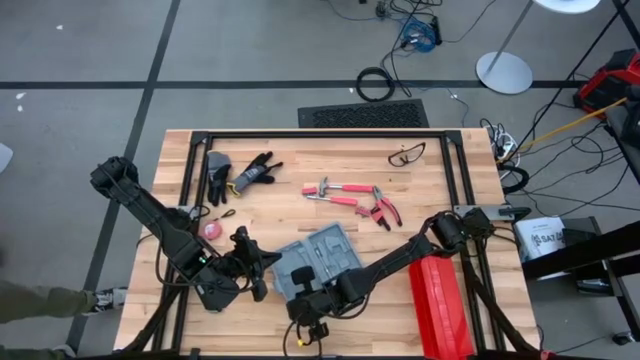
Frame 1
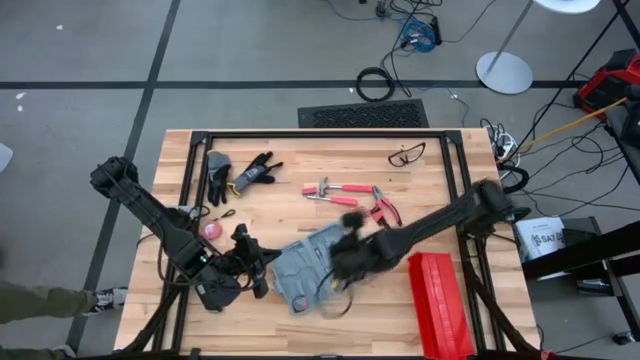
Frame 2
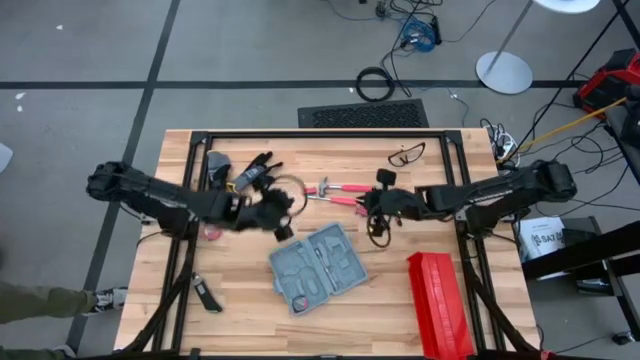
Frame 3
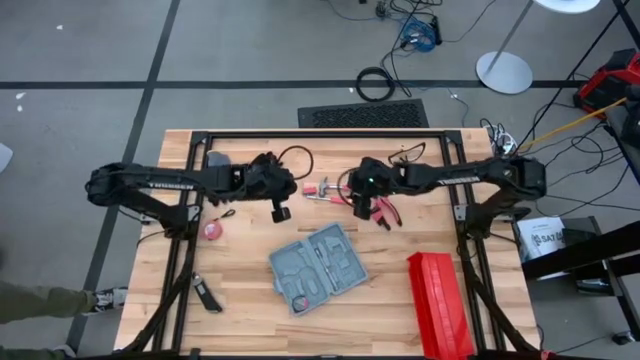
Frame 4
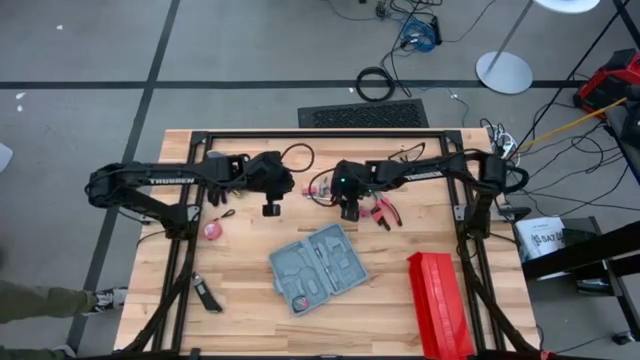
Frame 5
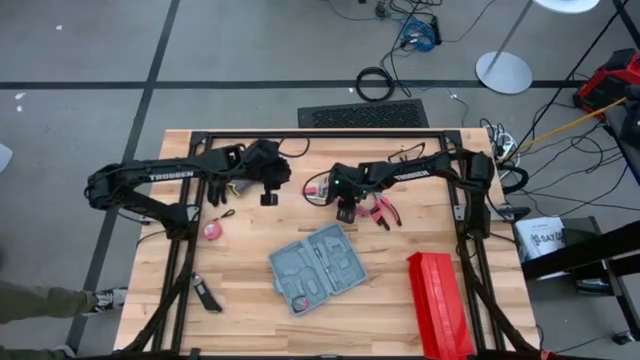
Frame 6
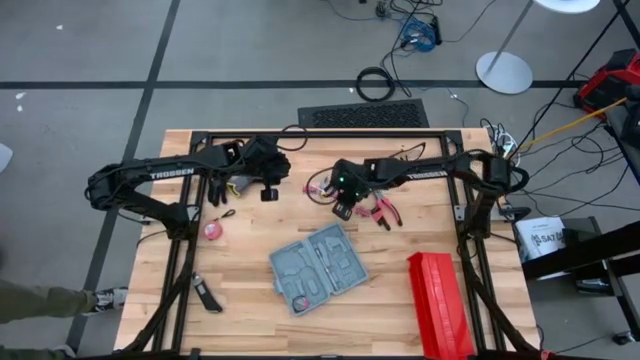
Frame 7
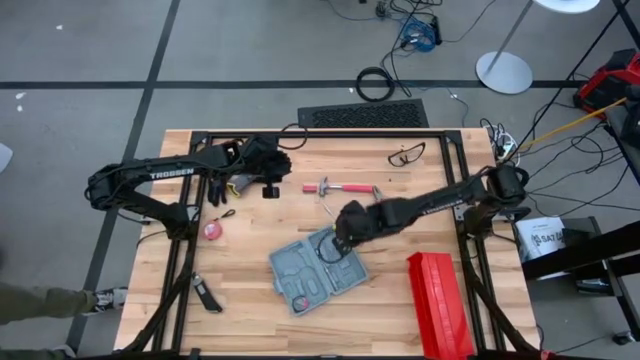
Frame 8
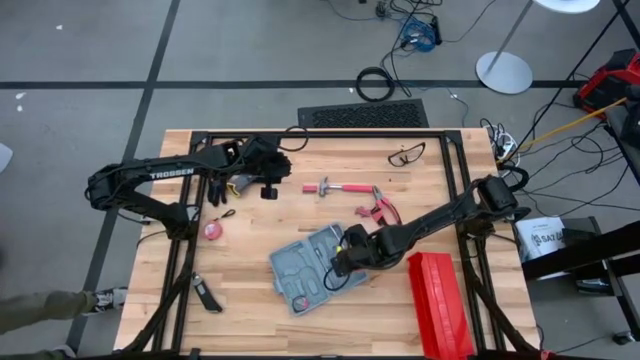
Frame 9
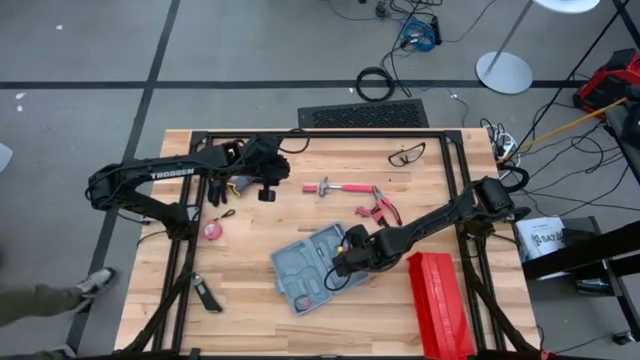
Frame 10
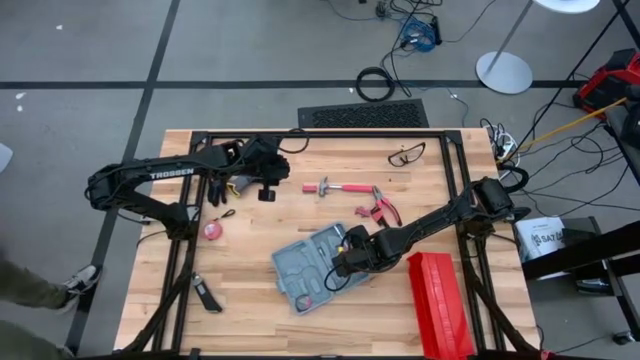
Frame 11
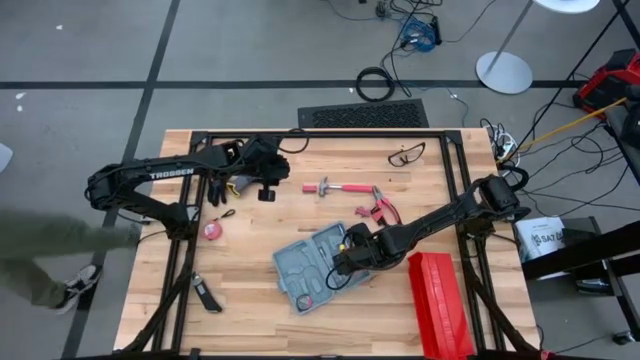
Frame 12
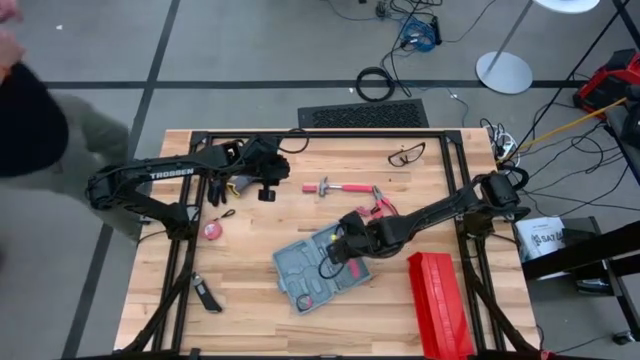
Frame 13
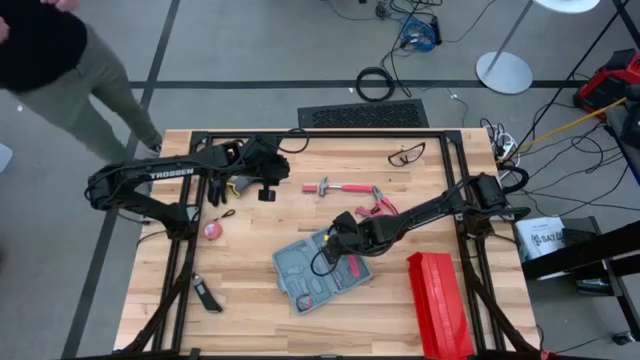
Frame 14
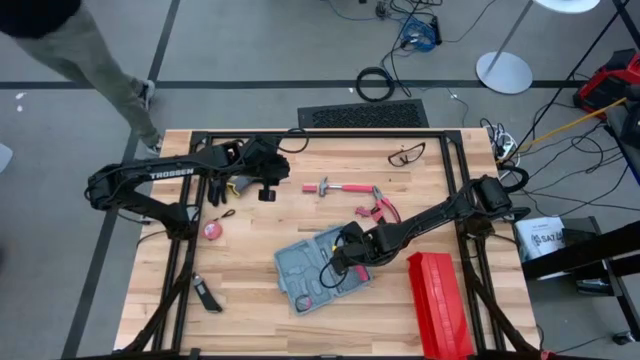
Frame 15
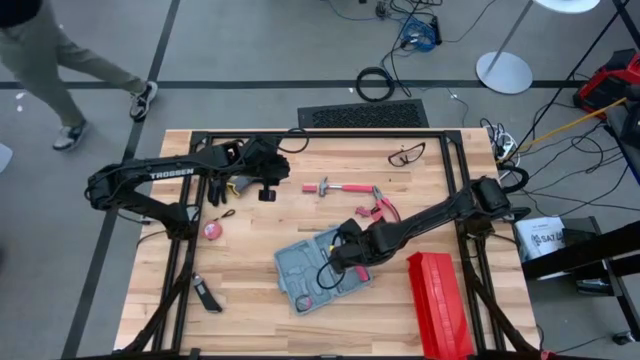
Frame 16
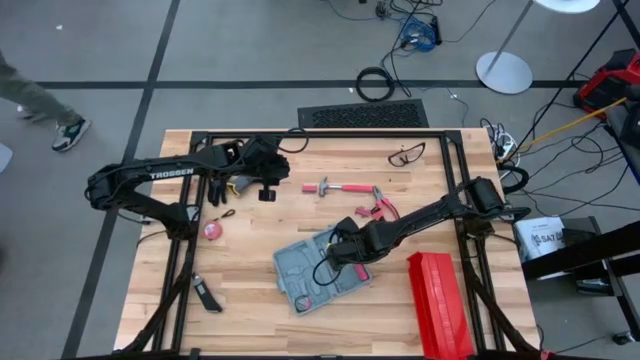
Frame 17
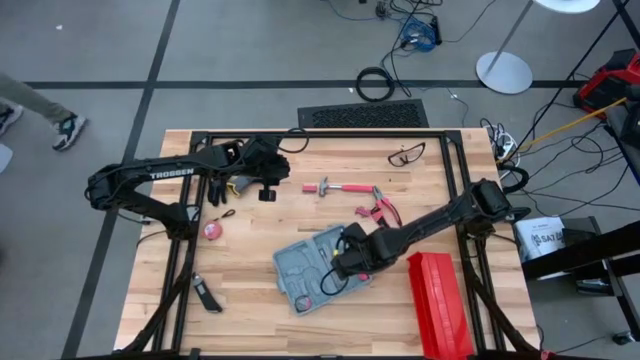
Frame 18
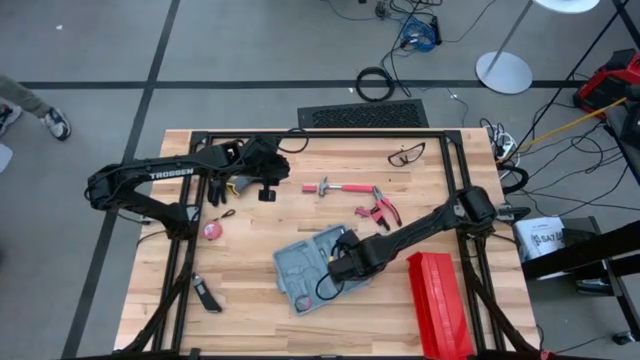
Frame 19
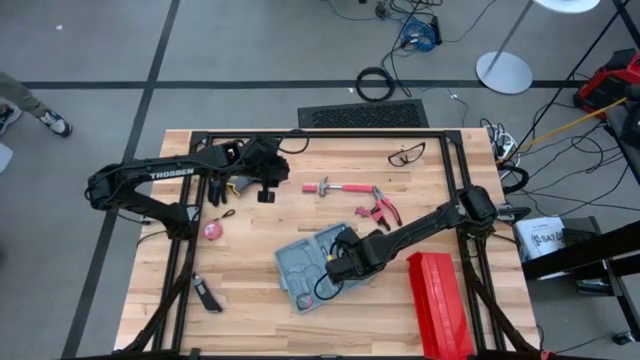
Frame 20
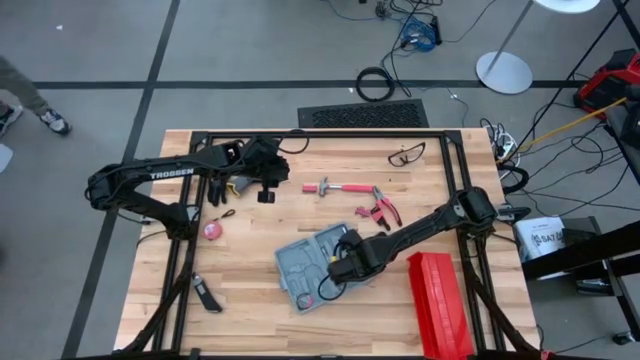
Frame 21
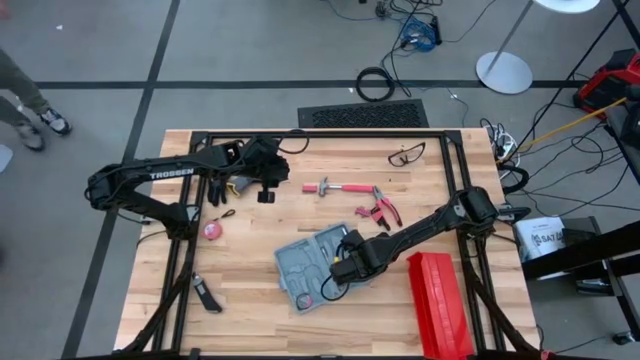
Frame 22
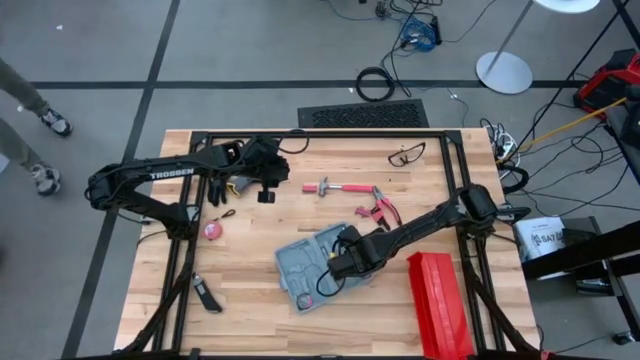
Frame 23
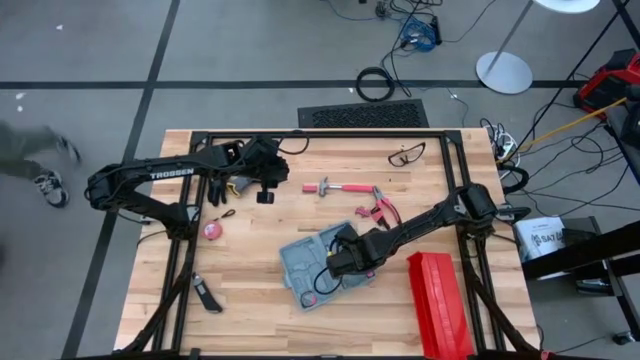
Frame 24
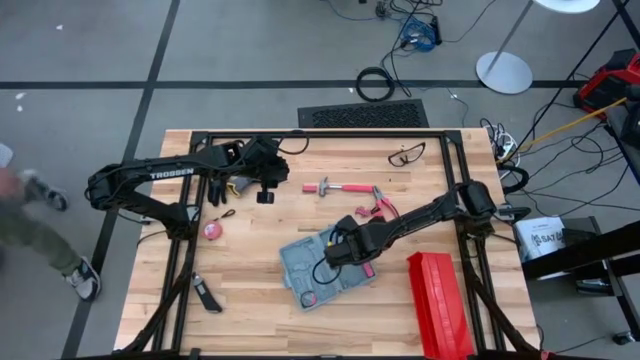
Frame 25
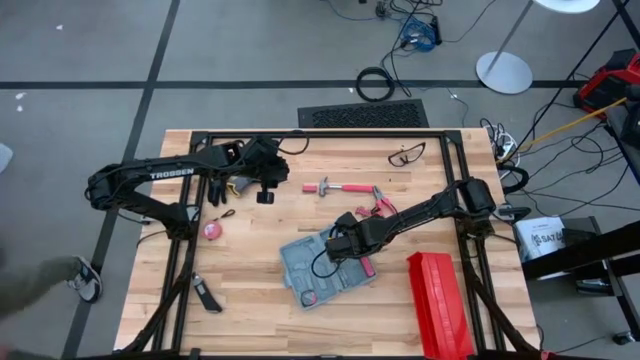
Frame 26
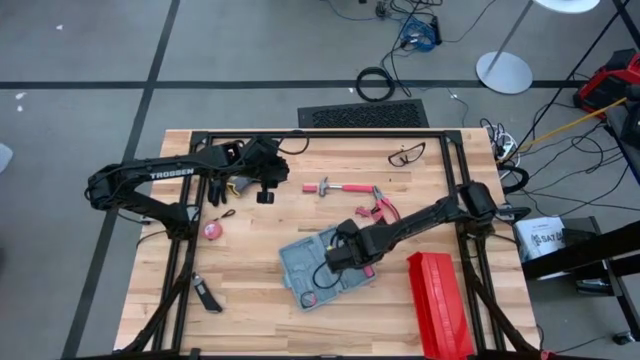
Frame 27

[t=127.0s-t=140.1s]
Task: prefit tool cases
Put the red screwdriver into the gray prefit tools case

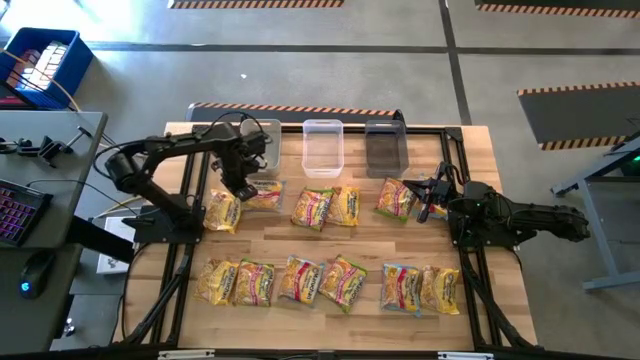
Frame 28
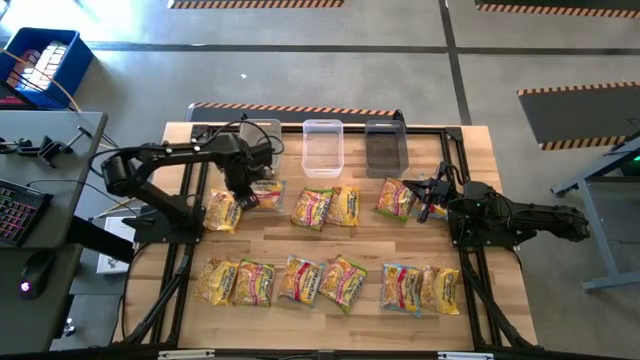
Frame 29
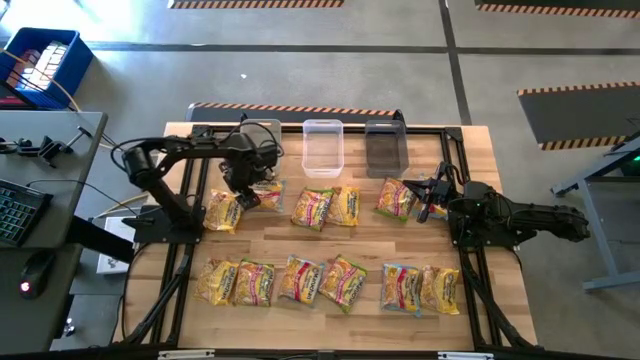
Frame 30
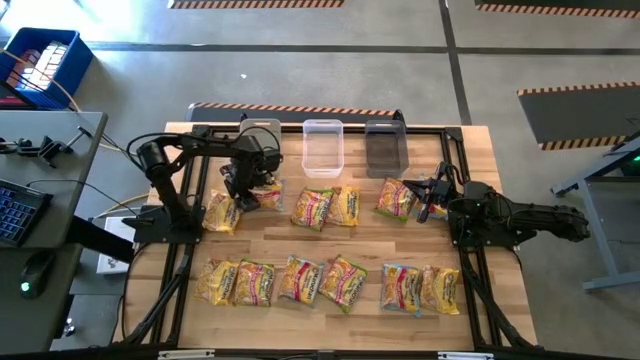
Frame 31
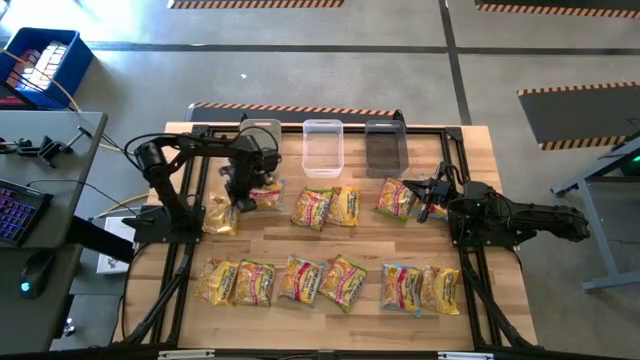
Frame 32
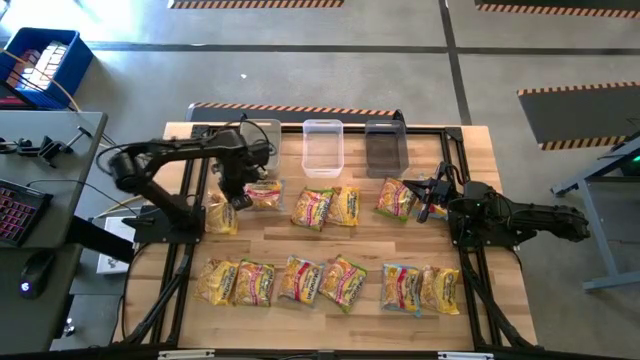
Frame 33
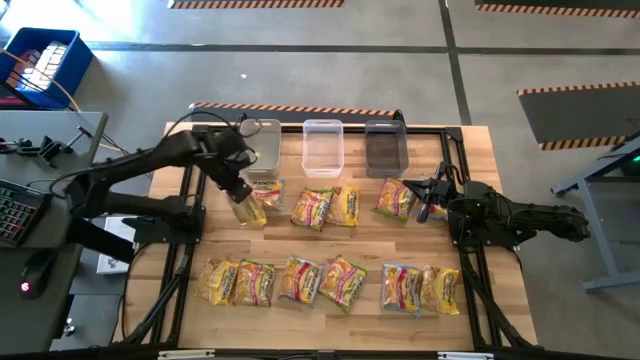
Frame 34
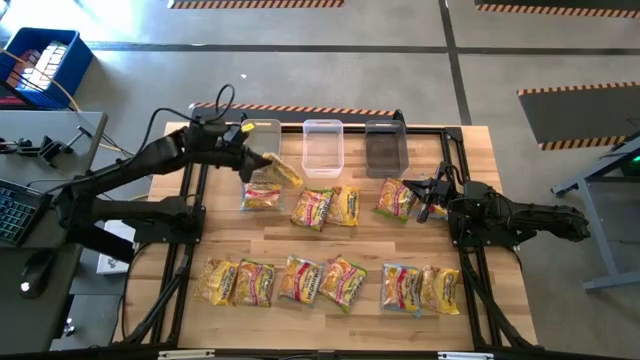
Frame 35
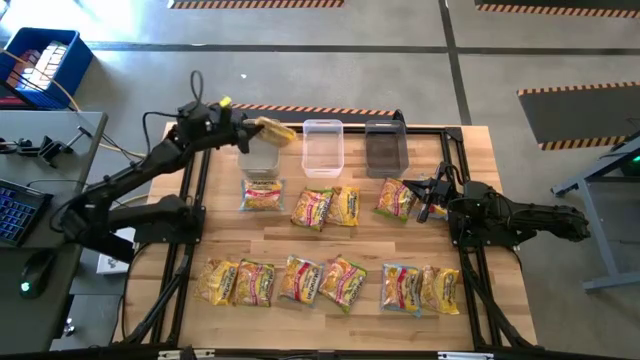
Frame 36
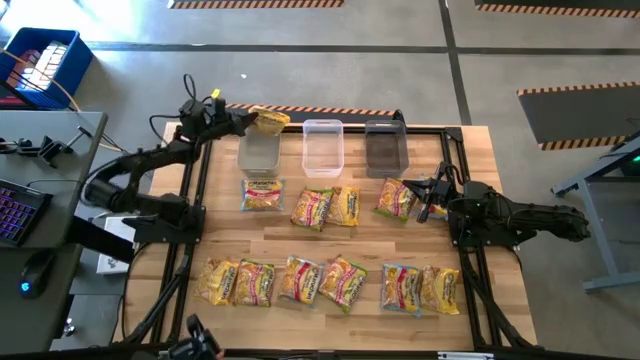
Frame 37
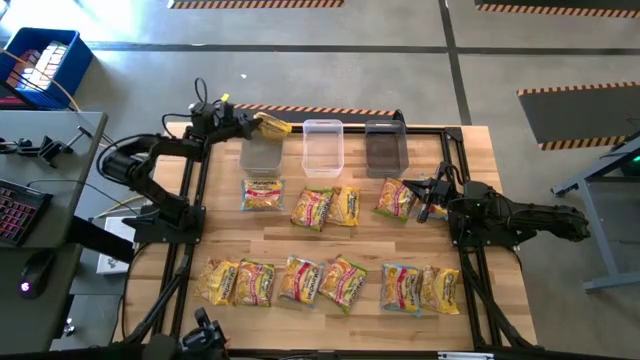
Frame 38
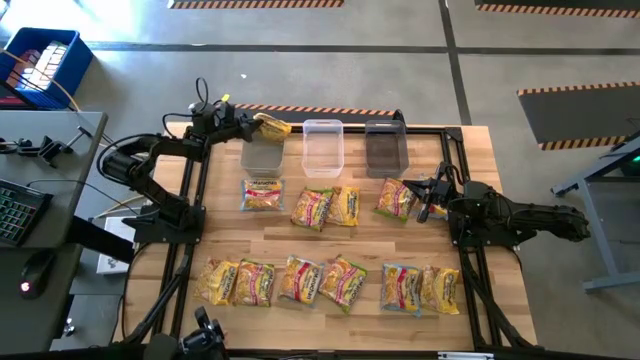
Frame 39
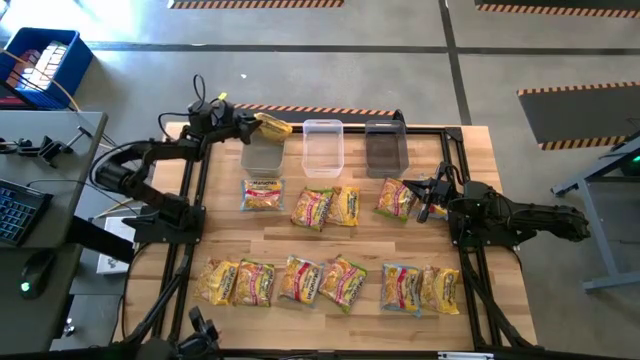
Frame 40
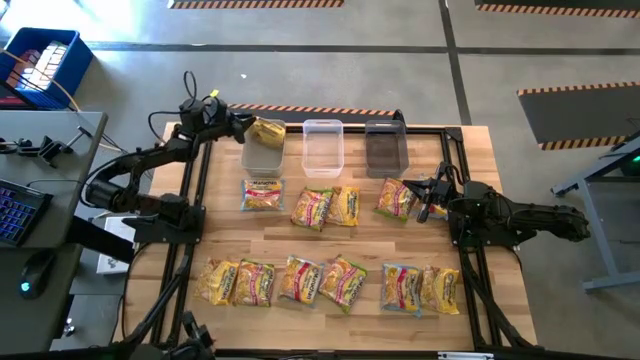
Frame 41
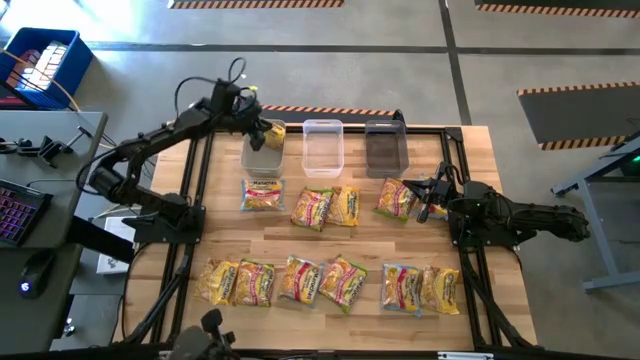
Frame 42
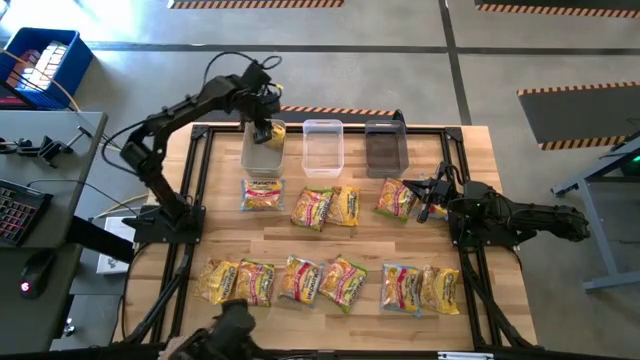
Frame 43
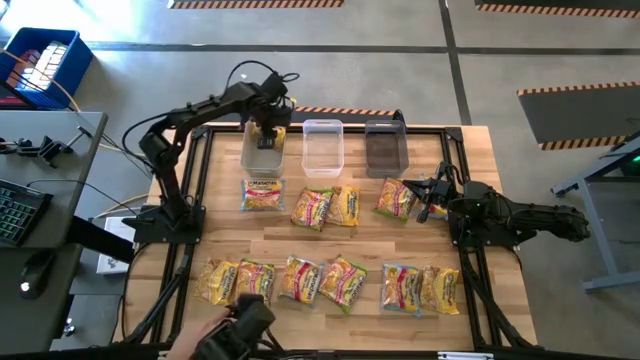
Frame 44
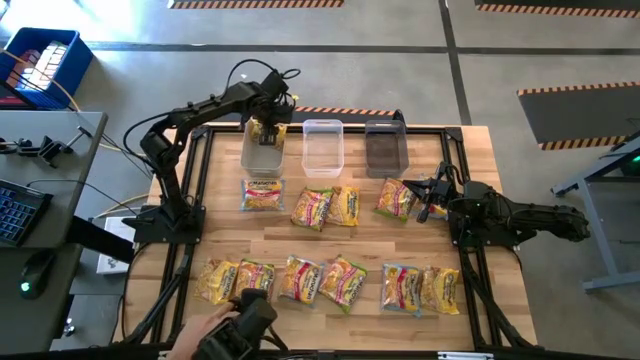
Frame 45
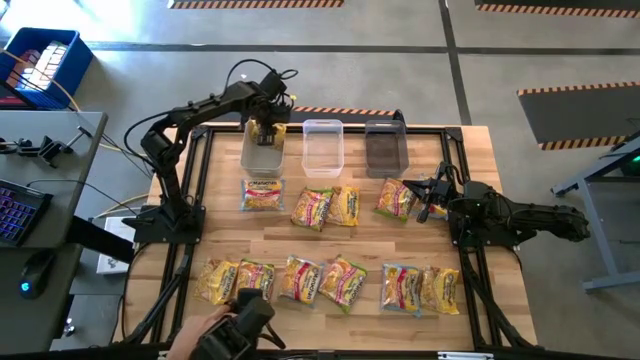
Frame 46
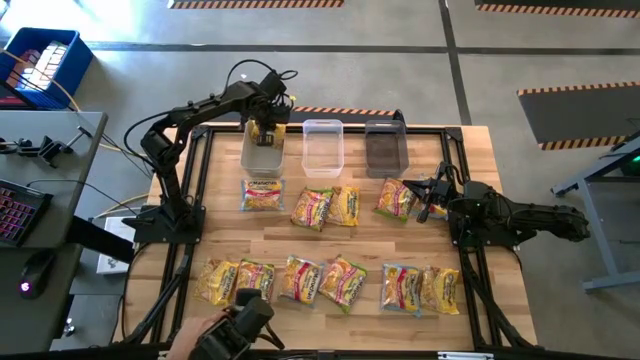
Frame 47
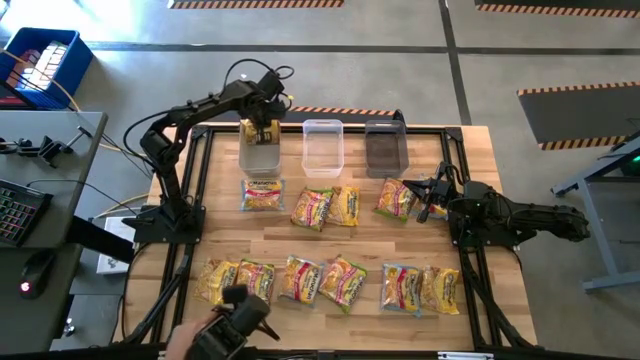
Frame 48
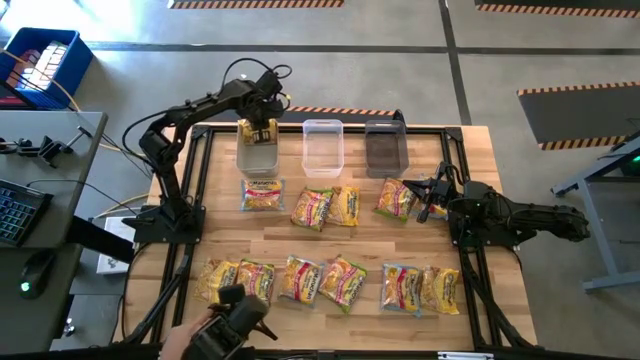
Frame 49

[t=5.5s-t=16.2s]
Task: Sort Maruchan noodles
Put the top left yellow noodle pack into the gray bin
